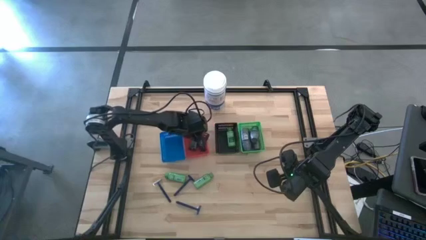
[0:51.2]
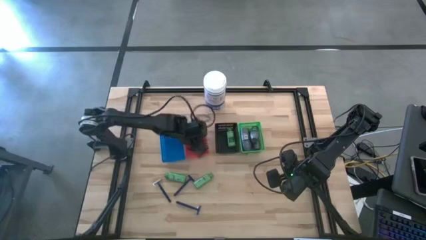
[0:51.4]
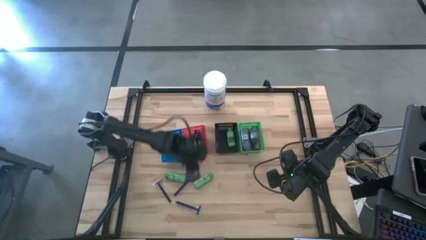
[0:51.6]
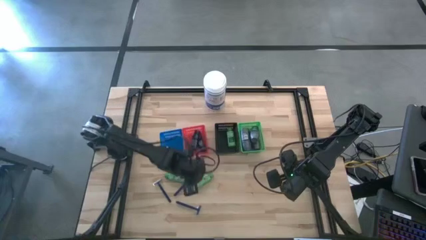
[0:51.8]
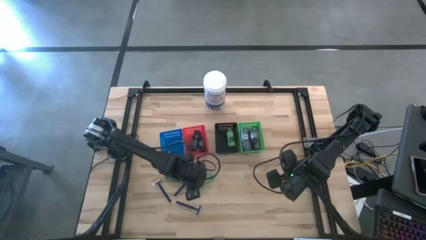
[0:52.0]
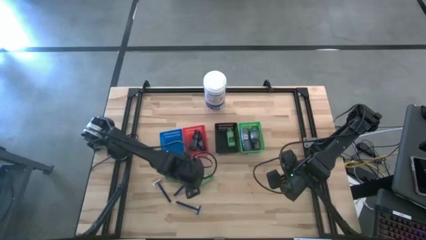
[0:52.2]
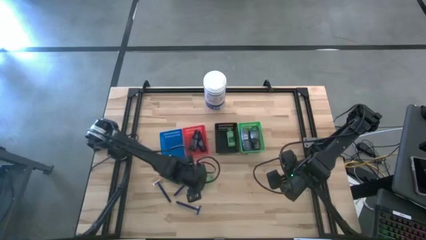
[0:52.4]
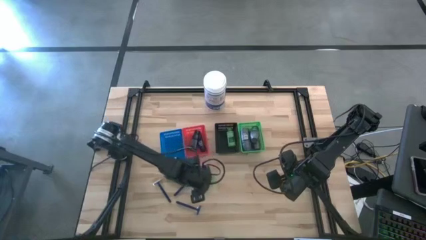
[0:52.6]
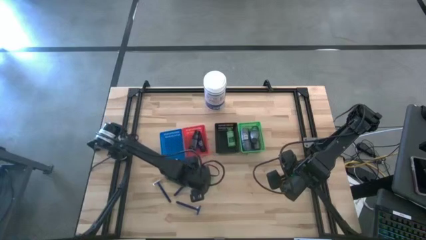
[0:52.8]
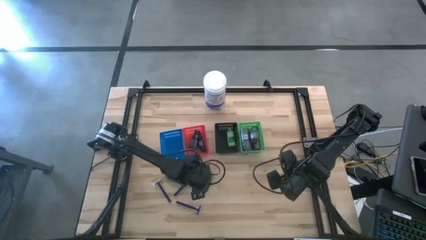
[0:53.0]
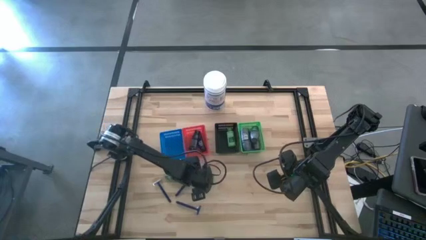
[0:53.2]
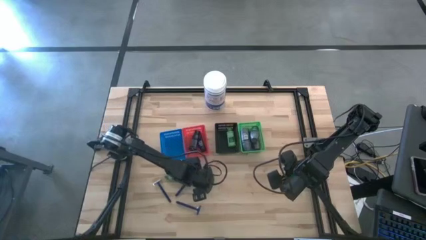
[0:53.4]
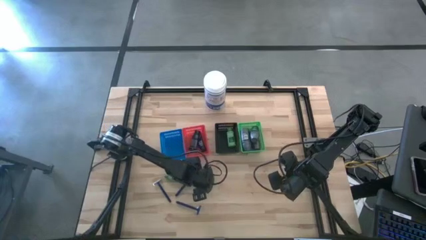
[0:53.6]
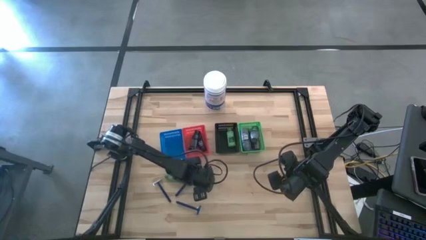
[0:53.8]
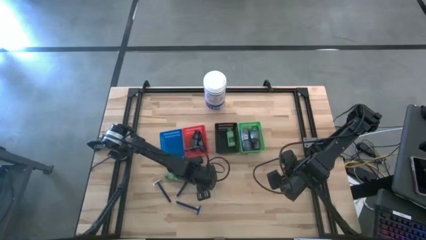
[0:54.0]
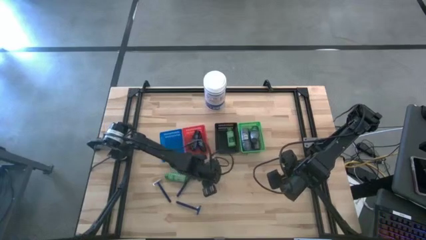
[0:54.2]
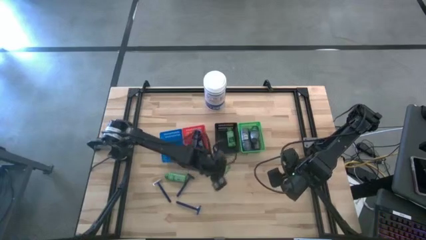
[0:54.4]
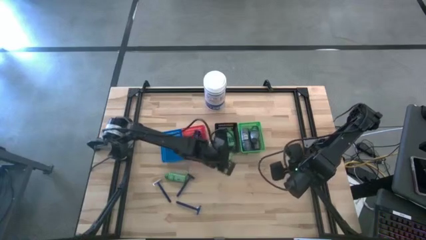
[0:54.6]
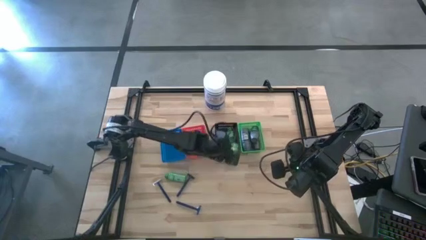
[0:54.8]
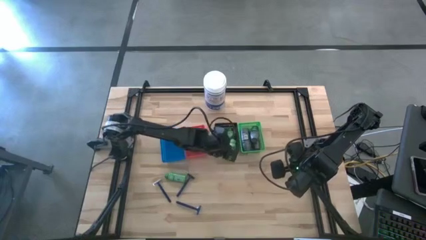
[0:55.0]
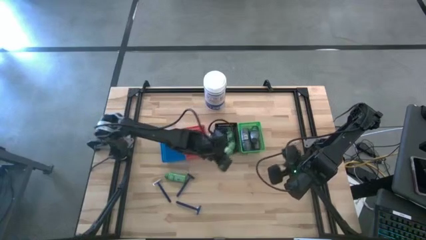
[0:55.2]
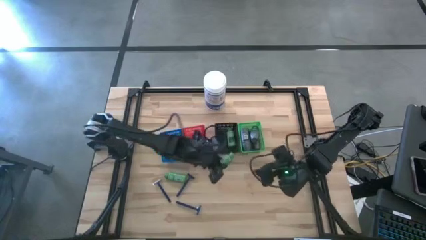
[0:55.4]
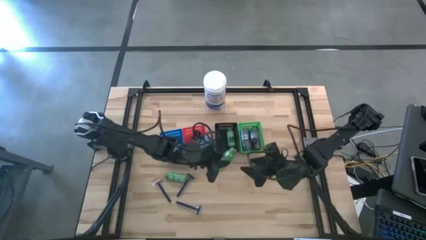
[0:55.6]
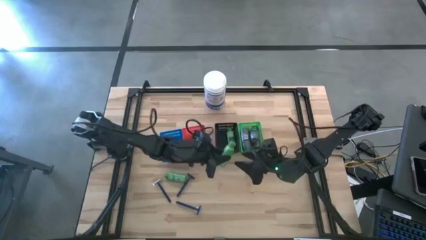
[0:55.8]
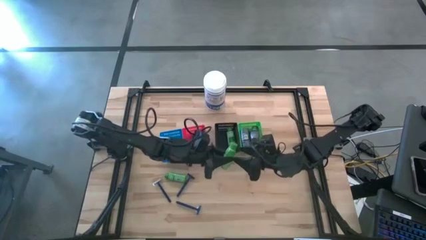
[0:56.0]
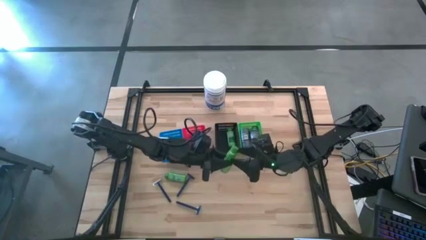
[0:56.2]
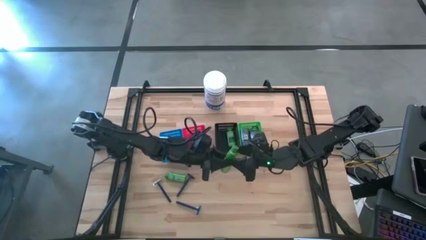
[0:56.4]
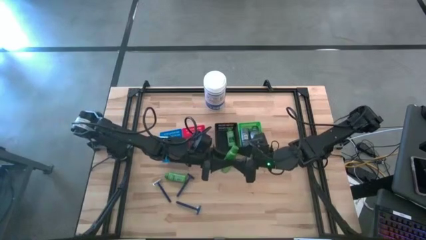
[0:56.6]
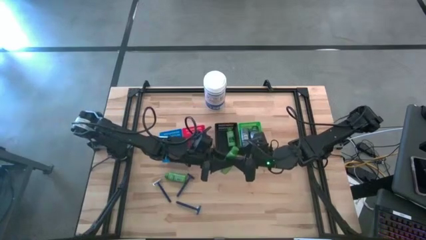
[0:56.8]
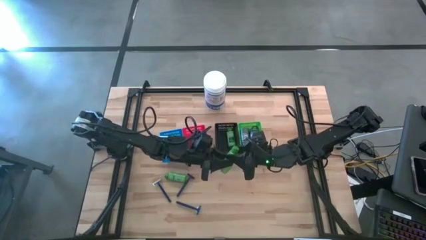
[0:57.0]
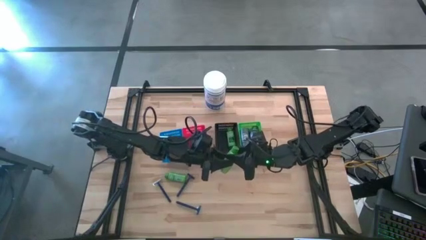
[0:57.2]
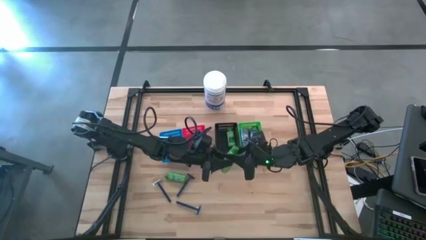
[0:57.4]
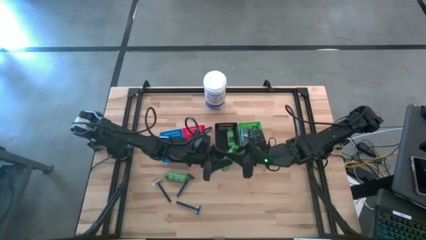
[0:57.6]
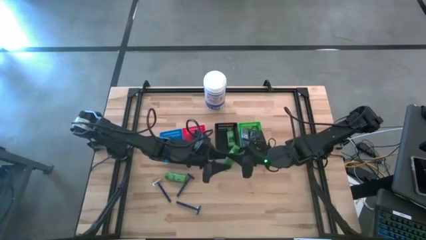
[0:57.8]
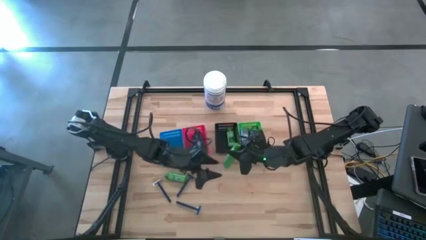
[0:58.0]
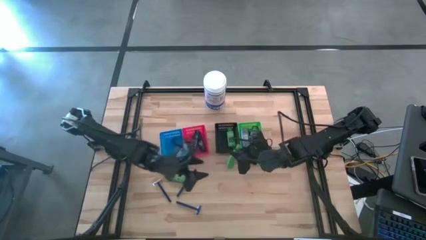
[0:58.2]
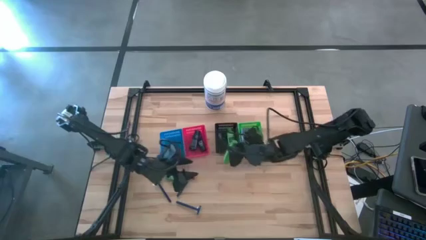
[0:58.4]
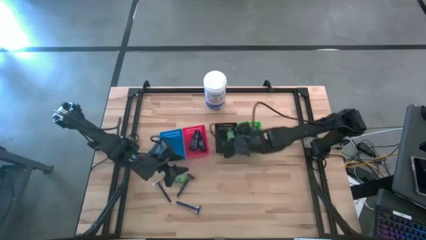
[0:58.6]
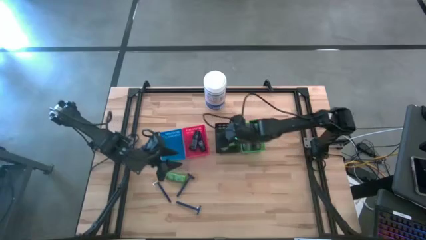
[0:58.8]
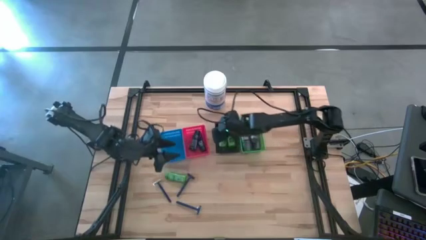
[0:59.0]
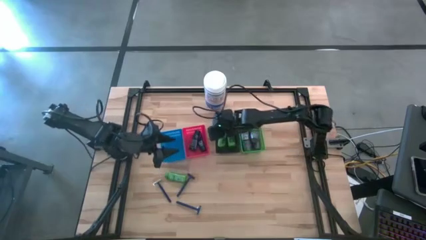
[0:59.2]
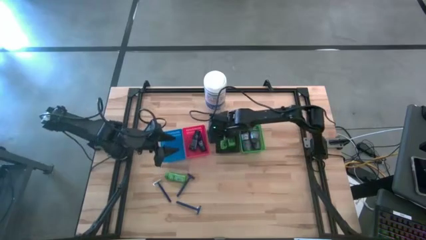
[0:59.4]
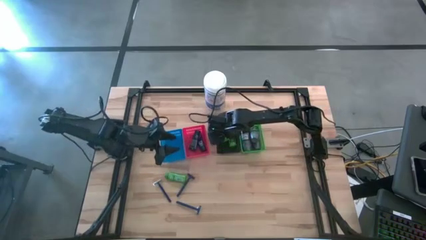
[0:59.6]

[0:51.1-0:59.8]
Task: Pick & Place Travel size toiletries
Put the green shampoo into the black basket

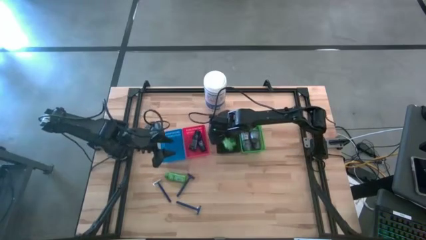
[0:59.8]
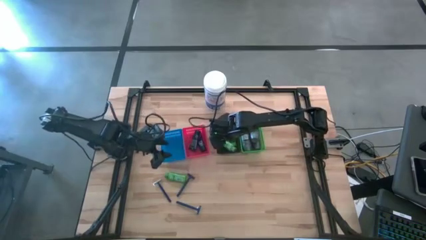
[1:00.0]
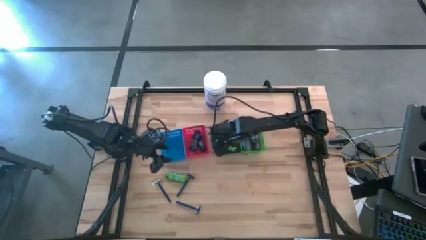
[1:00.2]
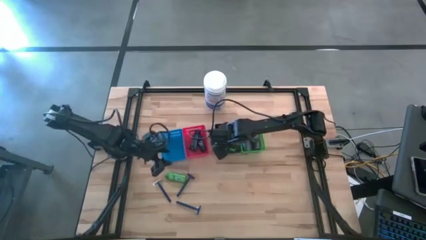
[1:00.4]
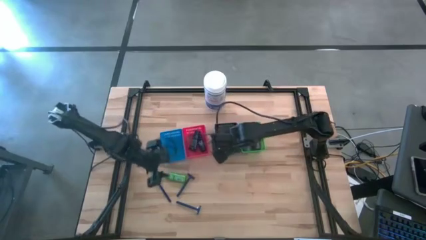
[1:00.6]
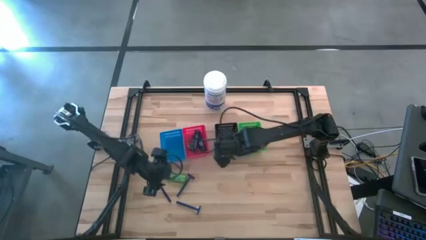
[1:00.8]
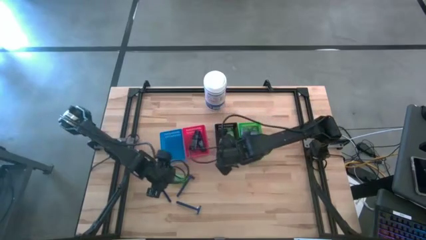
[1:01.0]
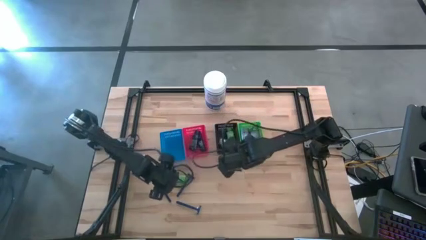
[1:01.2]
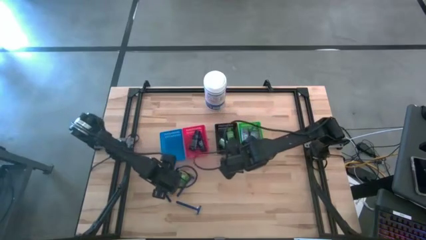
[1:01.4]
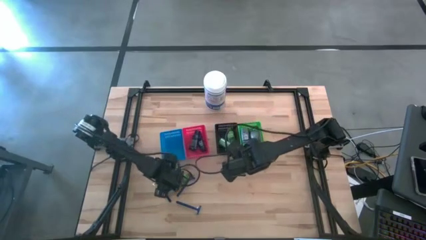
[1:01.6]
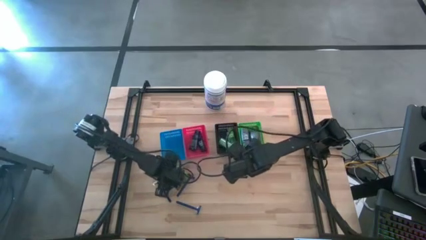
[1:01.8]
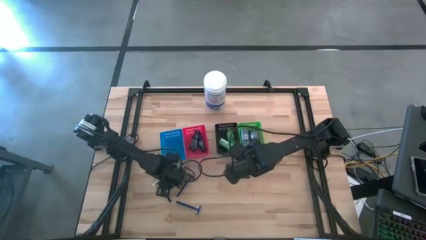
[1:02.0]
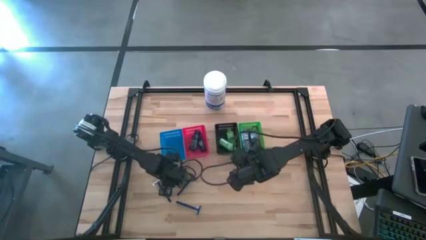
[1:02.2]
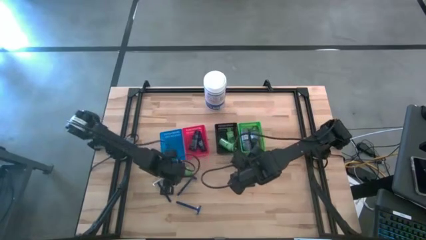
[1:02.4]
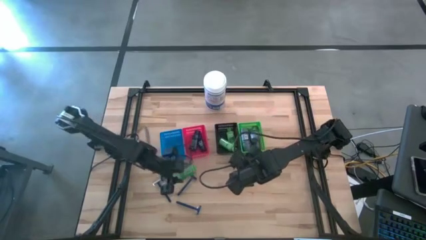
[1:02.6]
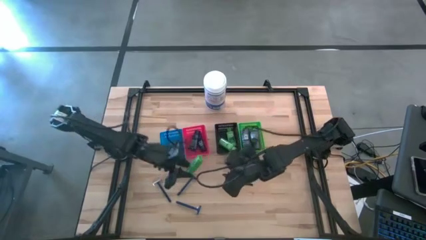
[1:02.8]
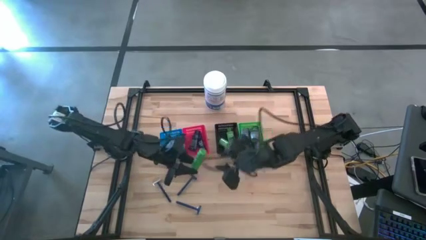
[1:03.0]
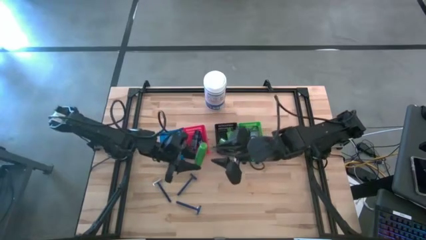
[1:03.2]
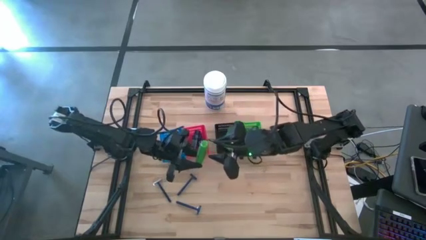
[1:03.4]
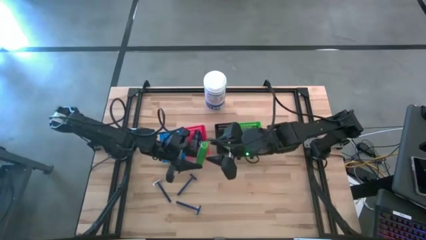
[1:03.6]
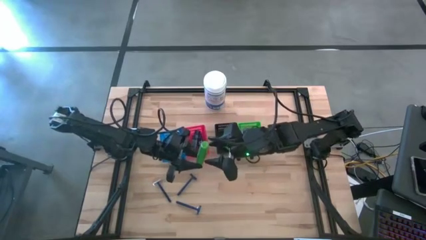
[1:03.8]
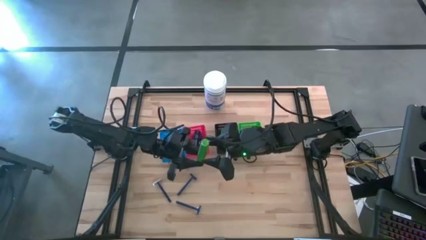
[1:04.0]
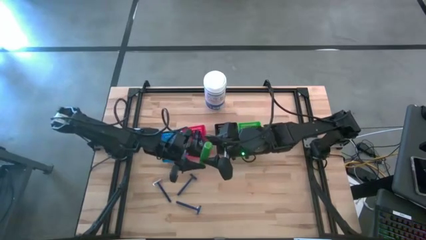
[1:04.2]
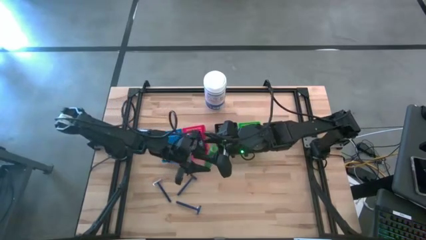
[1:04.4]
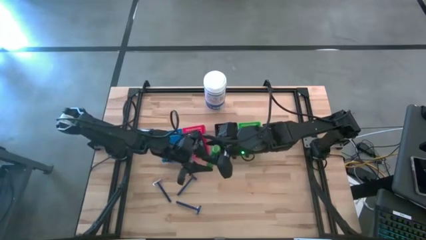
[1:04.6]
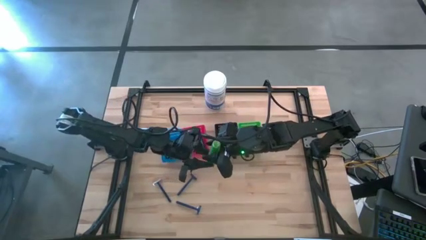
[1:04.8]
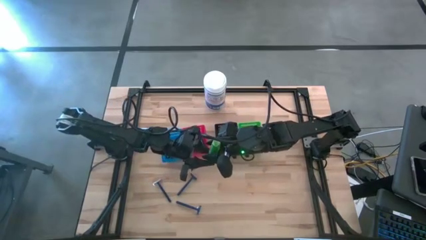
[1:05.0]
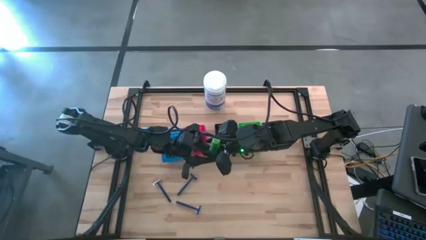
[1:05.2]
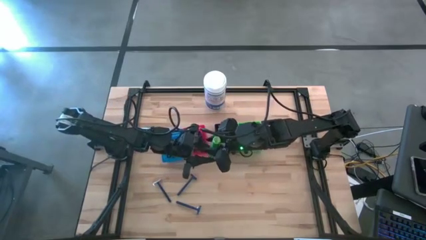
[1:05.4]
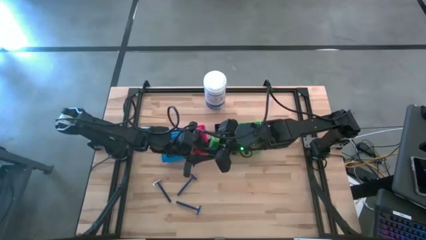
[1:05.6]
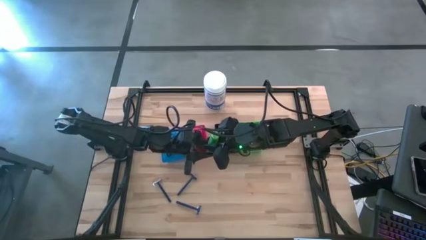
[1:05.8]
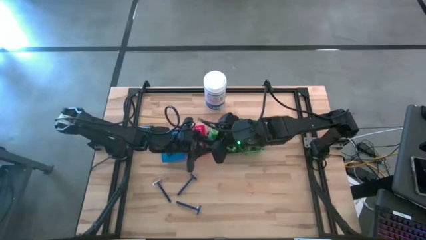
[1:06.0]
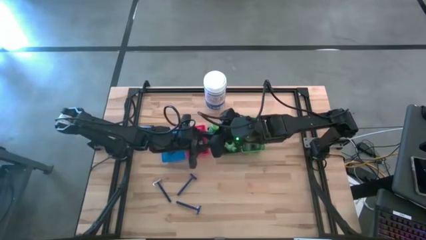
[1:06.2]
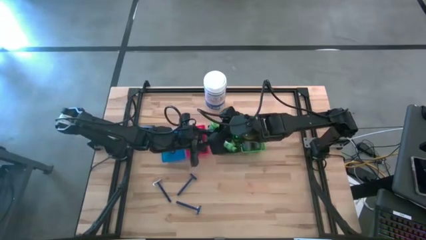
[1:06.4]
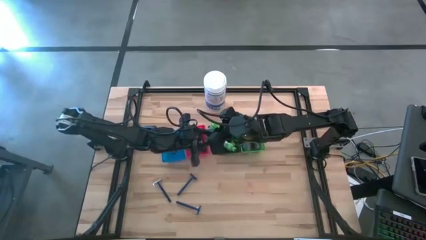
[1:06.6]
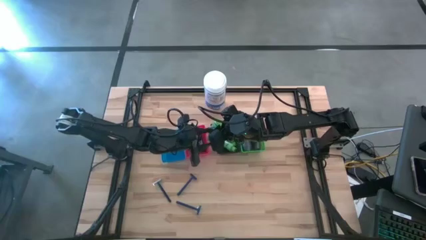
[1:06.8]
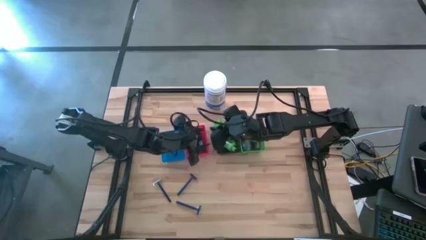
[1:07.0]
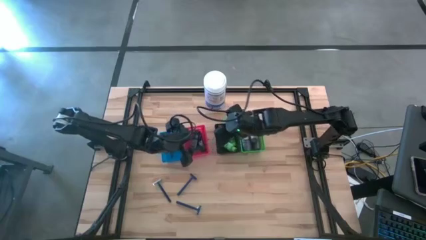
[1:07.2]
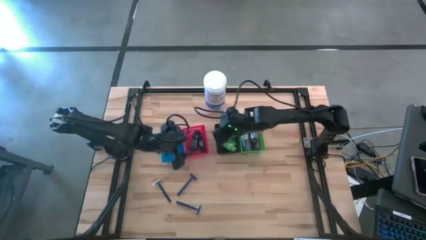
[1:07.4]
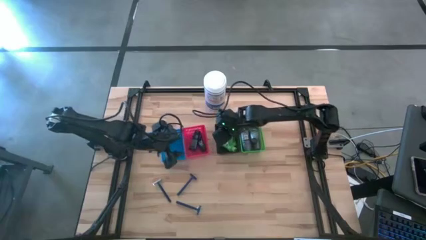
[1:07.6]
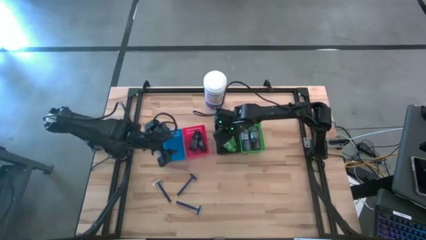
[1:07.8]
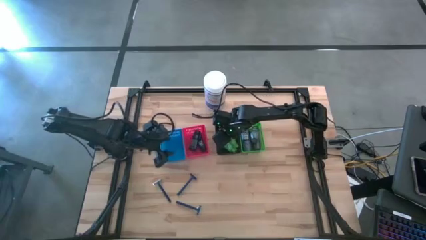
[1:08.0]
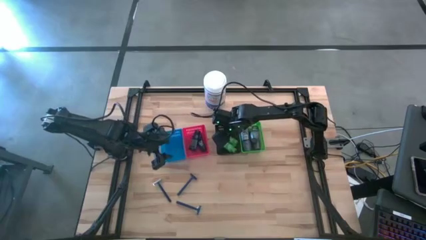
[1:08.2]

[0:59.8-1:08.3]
Put the green shampoo into the black basket
